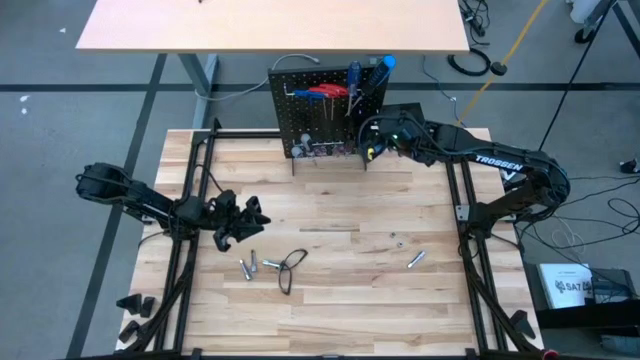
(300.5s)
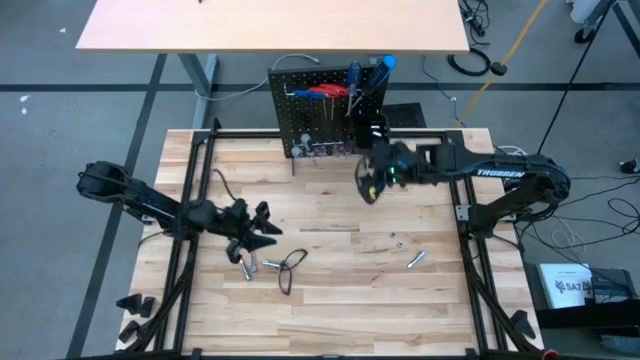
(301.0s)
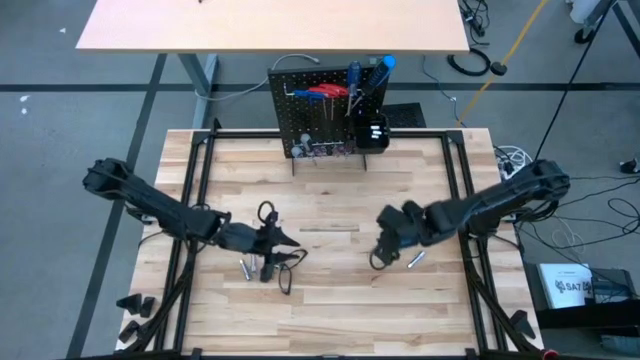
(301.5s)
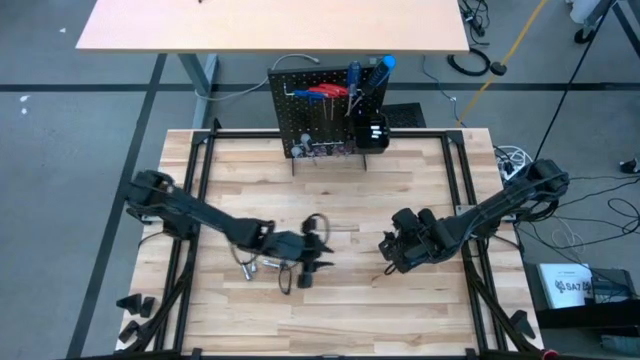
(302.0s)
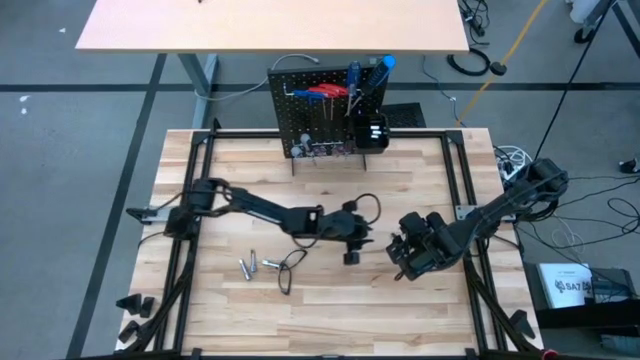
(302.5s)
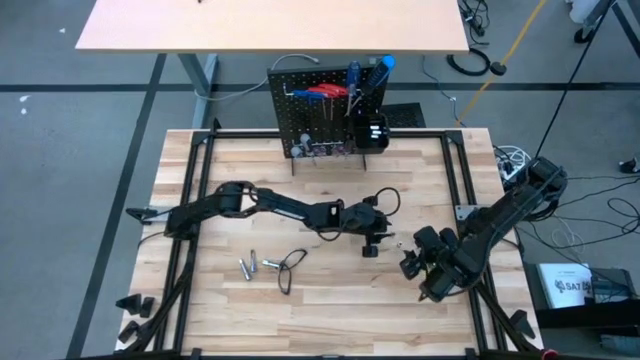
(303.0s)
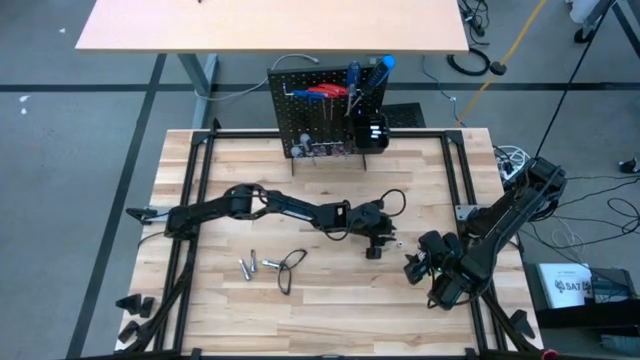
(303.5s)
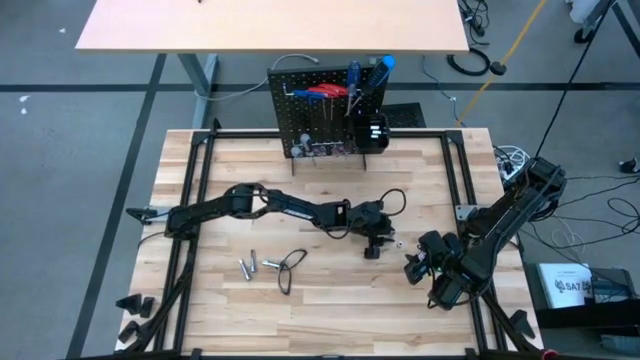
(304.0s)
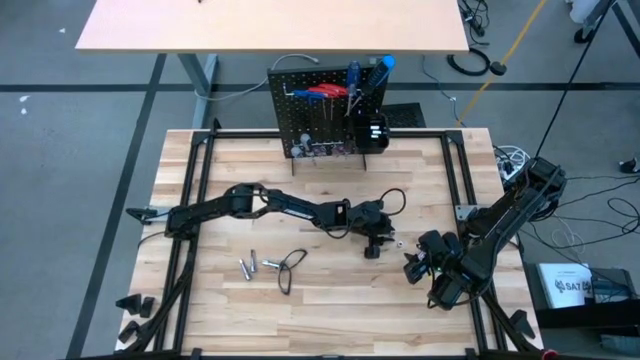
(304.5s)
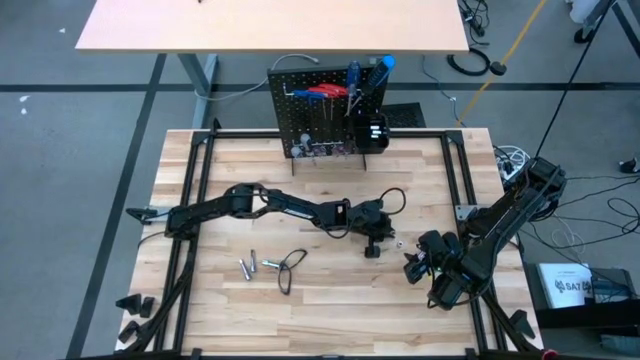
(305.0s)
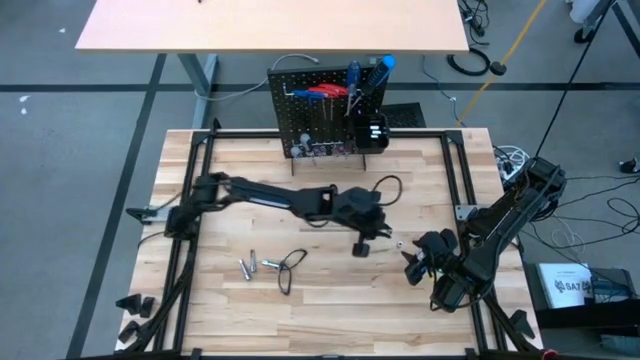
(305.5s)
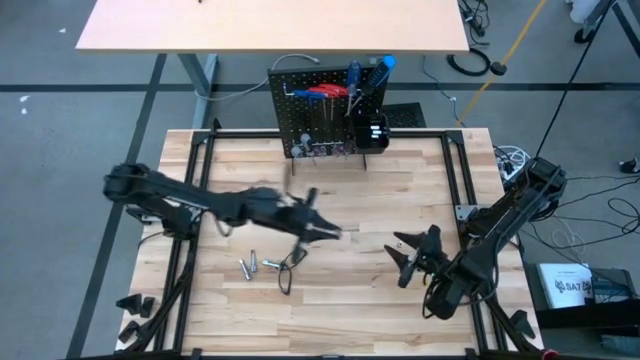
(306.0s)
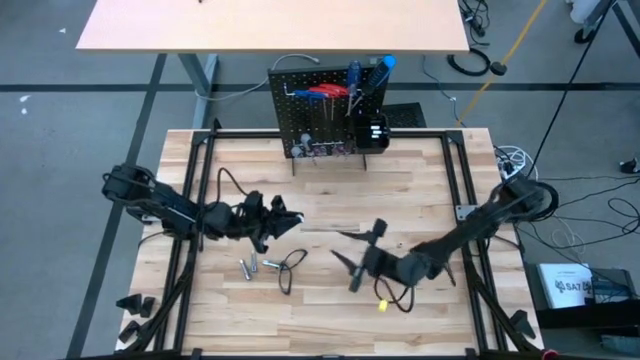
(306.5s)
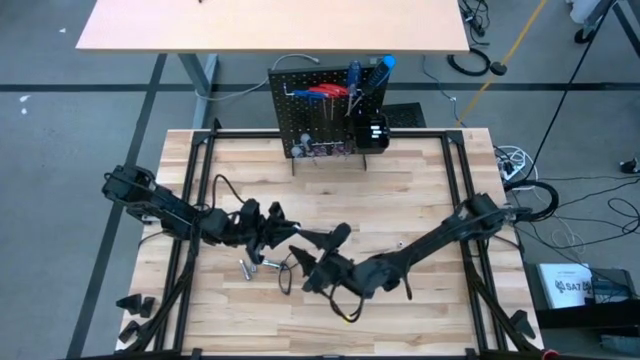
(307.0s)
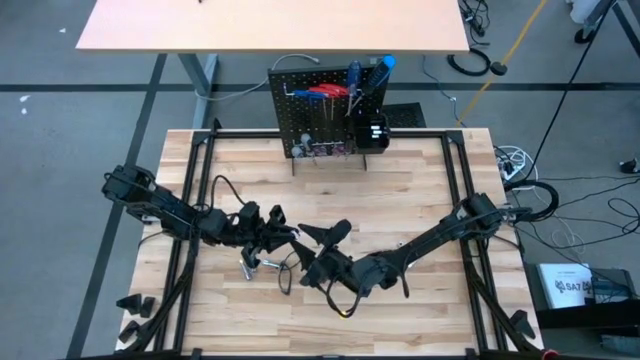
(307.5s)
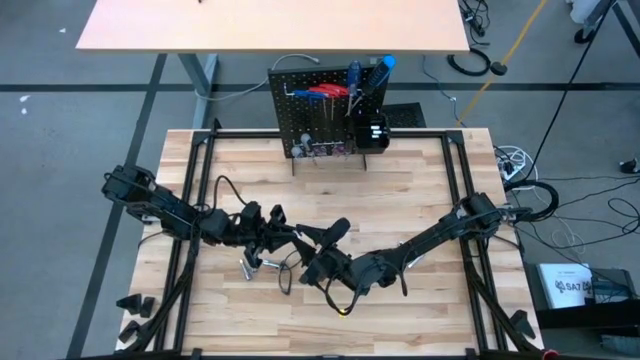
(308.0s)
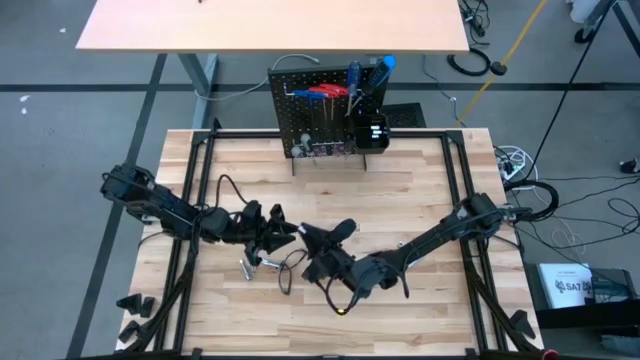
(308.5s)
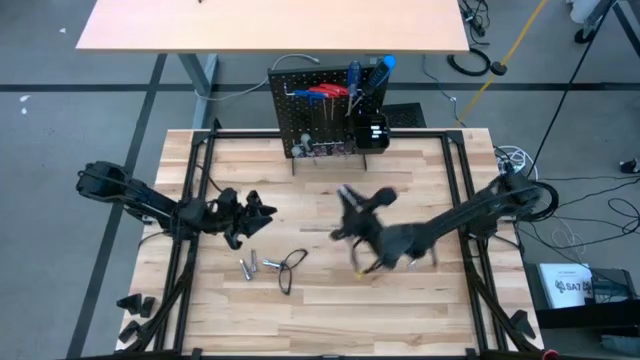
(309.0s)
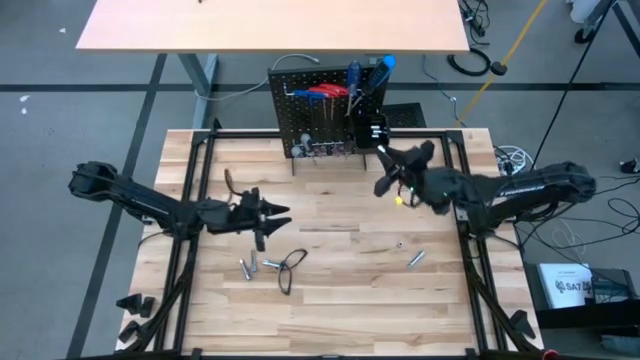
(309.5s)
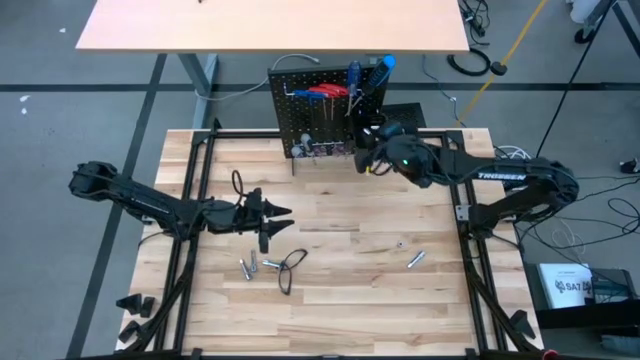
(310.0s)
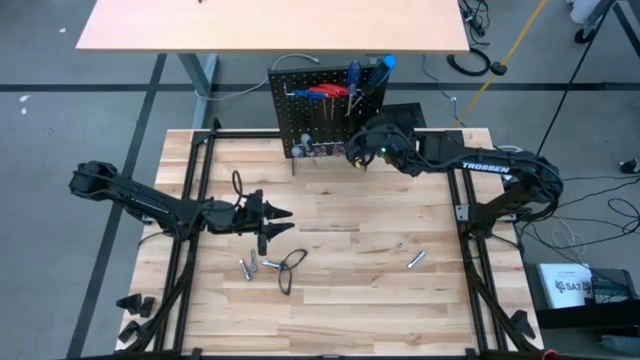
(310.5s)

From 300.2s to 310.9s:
Task: Hang tools onto peg board
Put the top socket into the black bin on the peg board

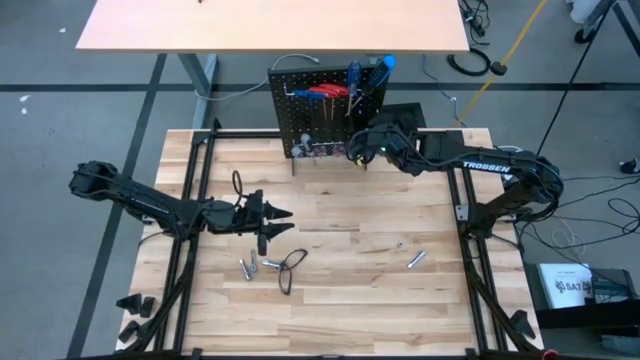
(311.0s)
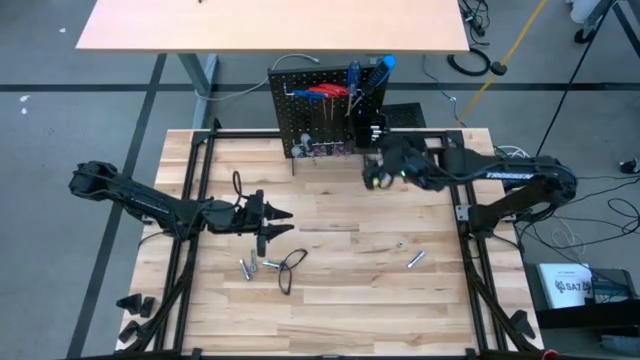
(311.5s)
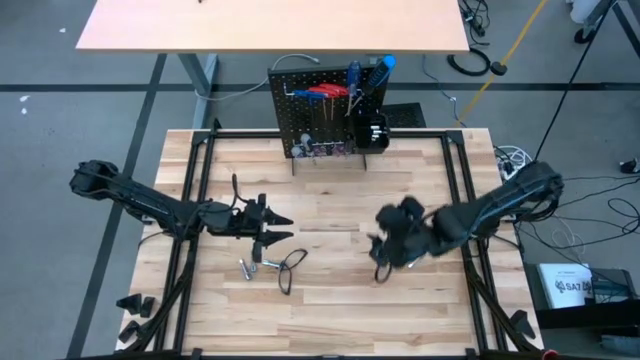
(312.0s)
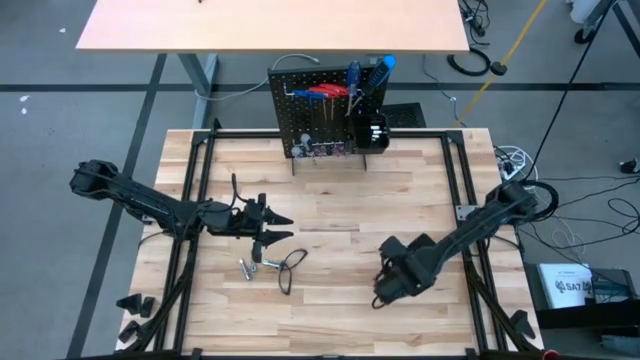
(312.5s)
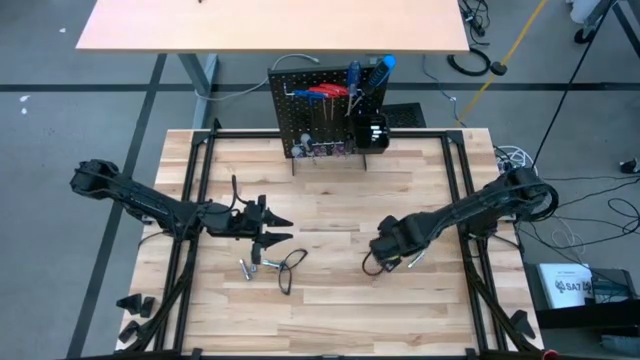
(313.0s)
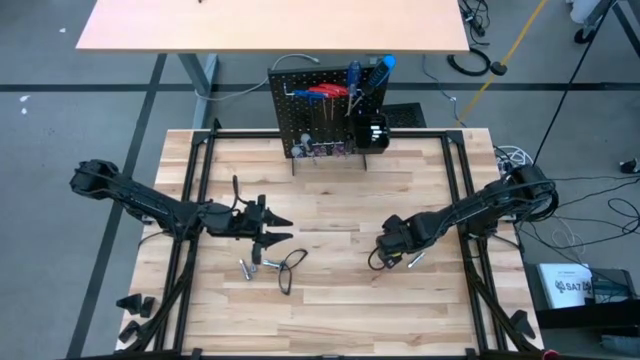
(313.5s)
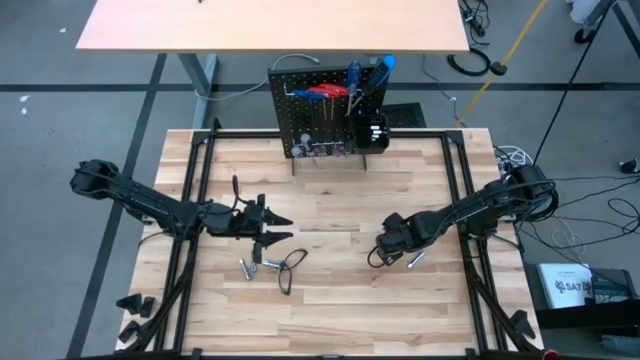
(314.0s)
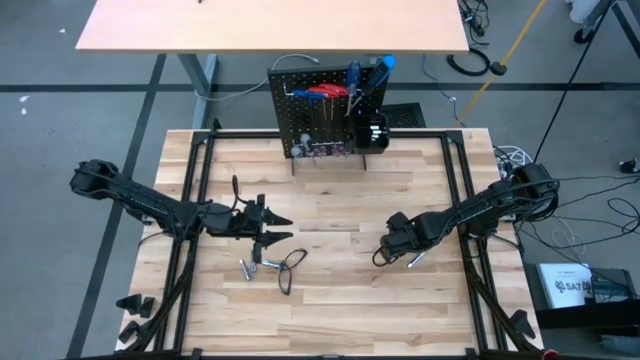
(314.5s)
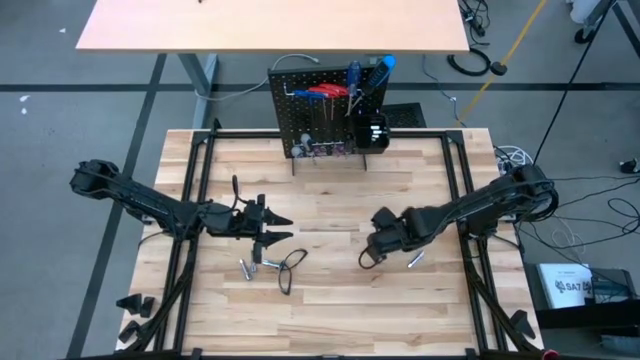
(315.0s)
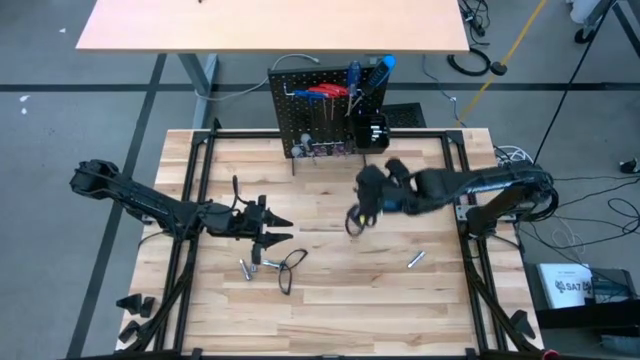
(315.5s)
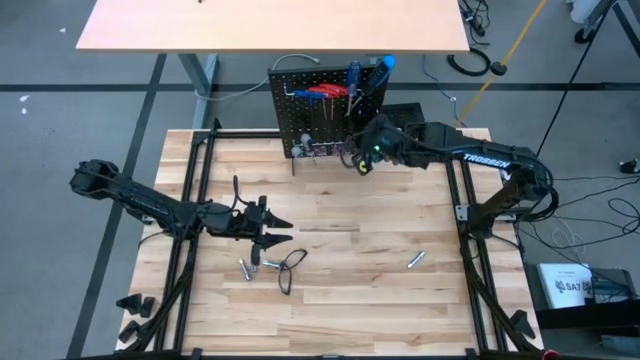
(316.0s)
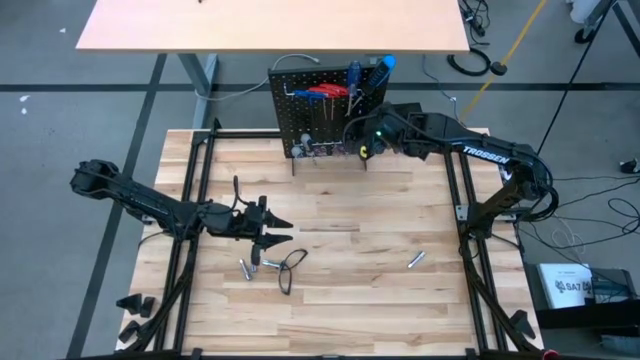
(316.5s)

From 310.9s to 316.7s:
Put the socket into the black bin on the peg board

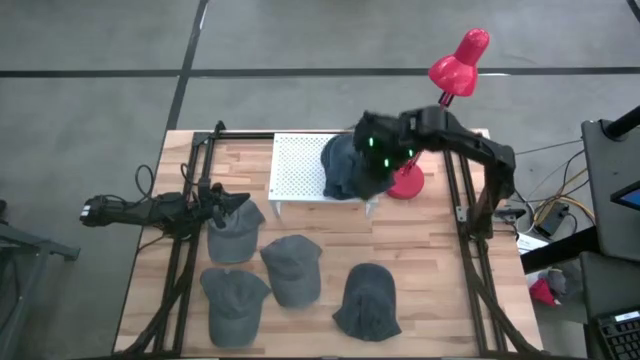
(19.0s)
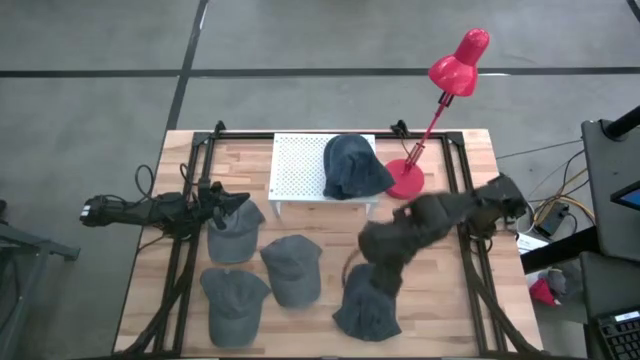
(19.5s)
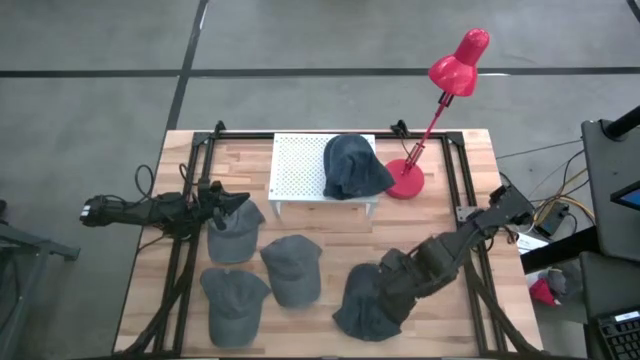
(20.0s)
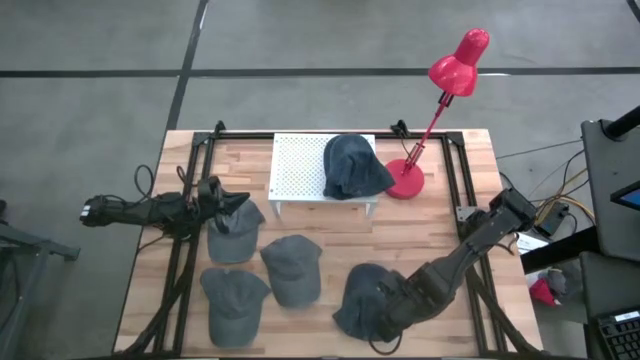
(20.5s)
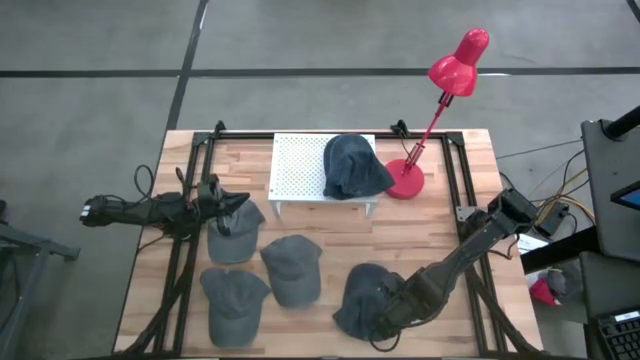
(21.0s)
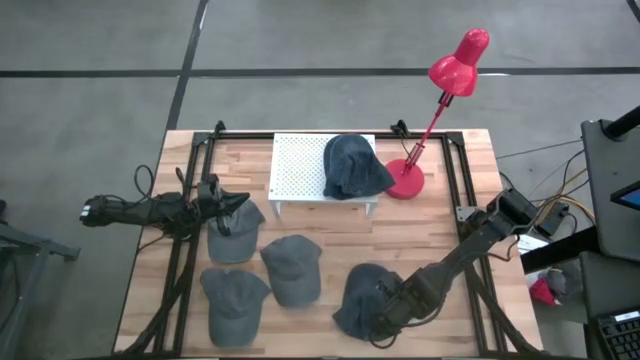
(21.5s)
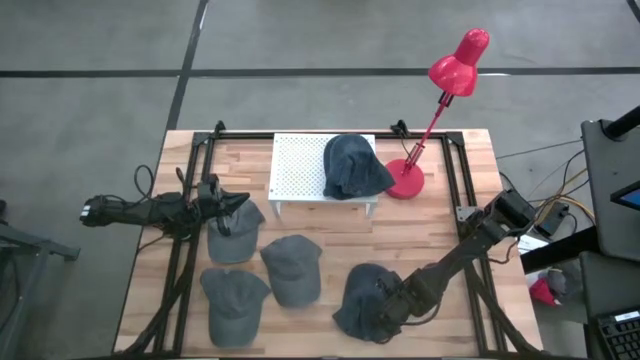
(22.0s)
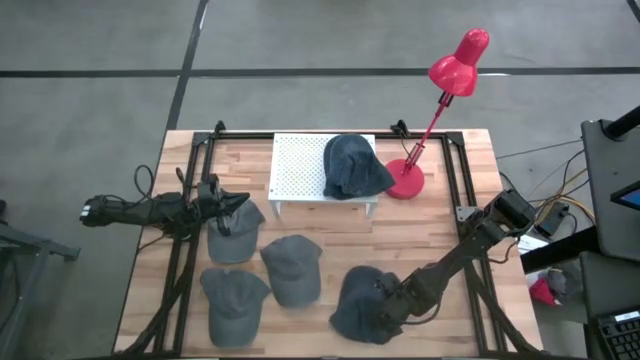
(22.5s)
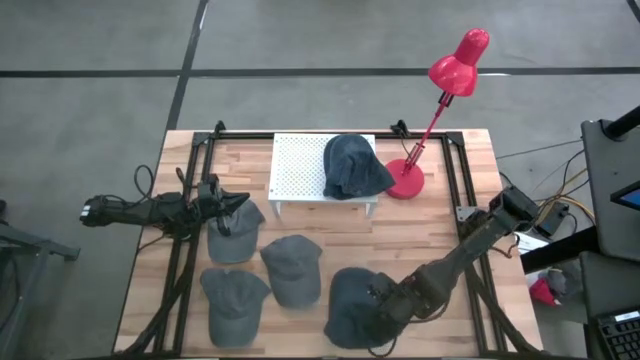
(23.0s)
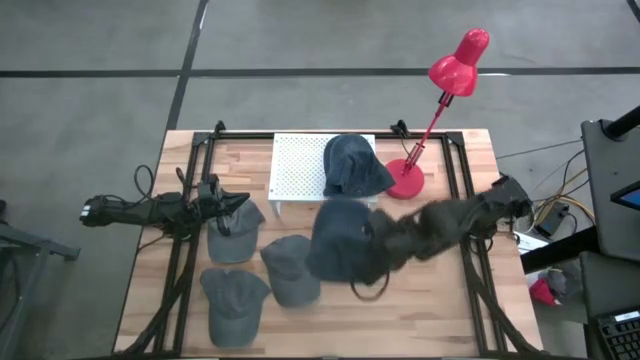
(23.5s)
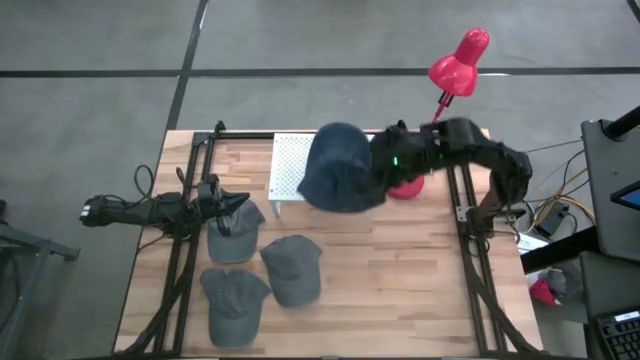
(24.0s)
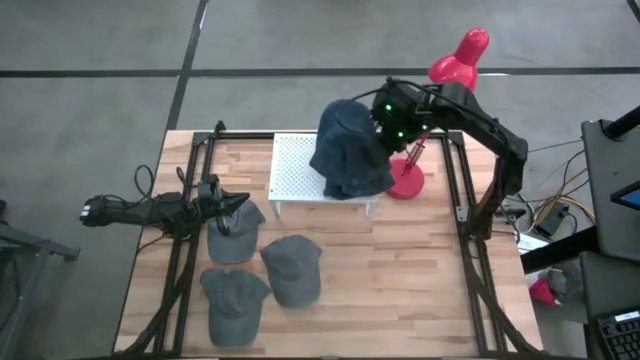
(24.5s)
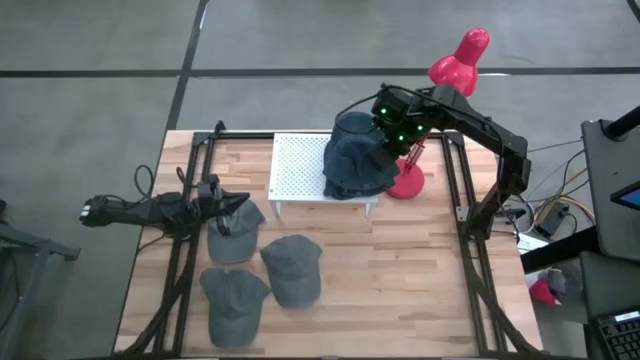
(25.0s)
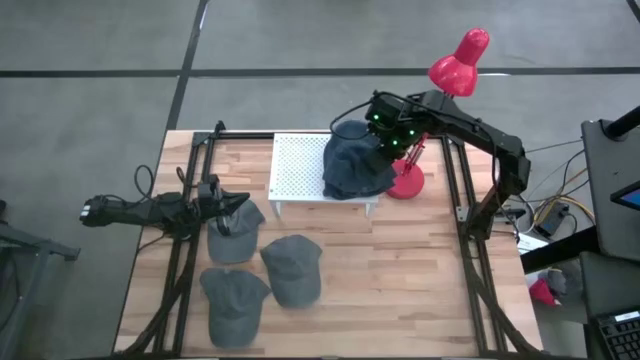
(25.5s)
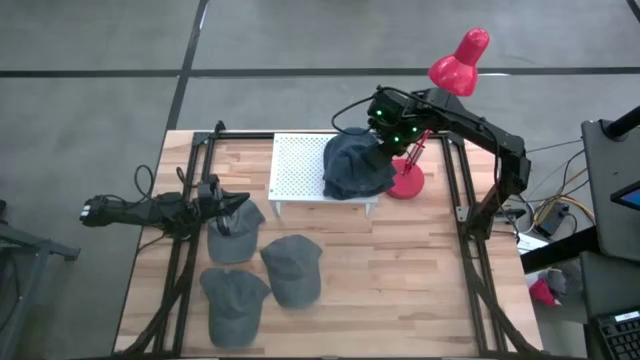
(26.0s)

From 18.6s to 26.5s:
Task: Pick & Place hat
Stack the blue cap on the other blue cap on the shelf
